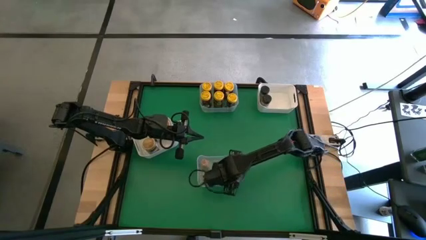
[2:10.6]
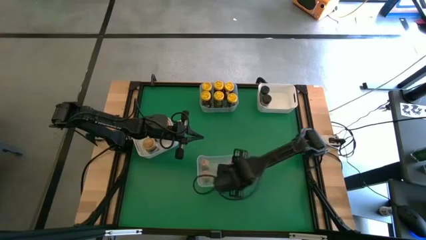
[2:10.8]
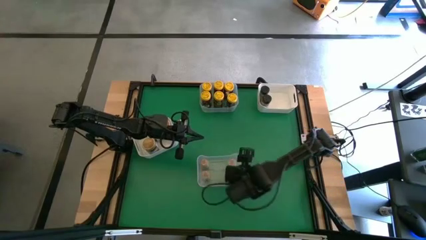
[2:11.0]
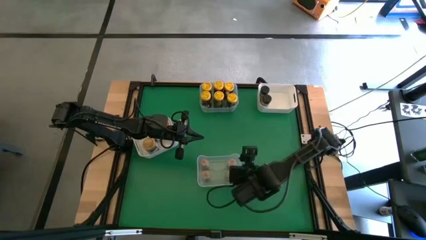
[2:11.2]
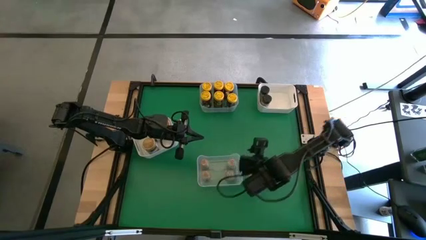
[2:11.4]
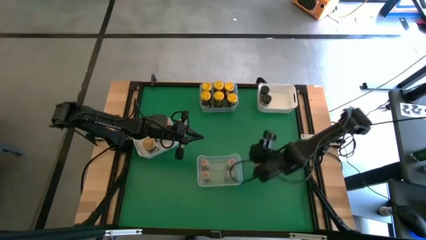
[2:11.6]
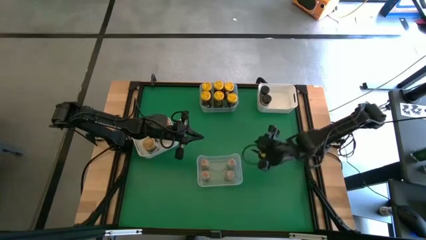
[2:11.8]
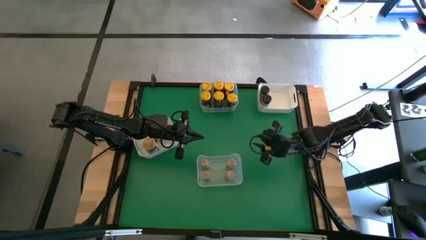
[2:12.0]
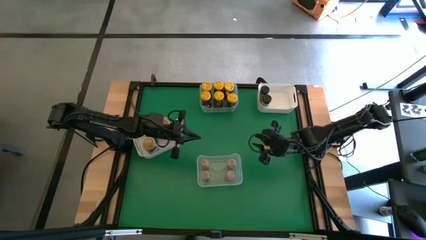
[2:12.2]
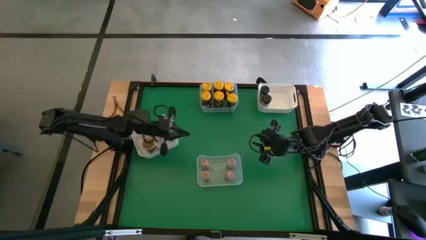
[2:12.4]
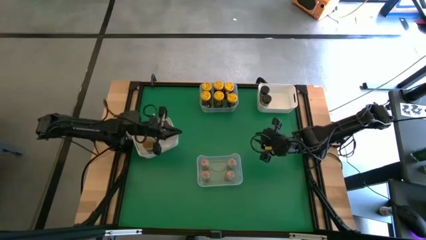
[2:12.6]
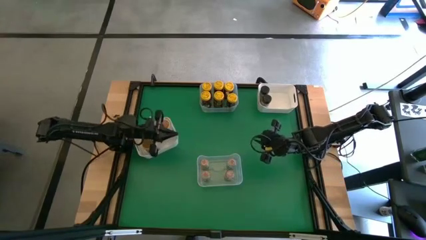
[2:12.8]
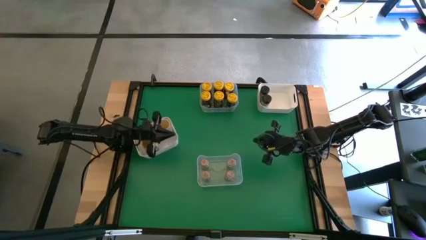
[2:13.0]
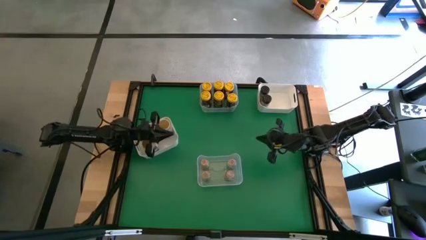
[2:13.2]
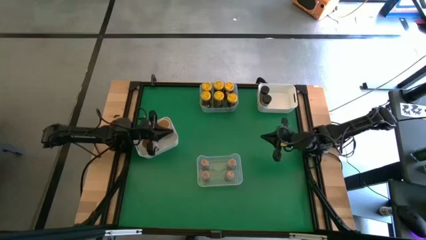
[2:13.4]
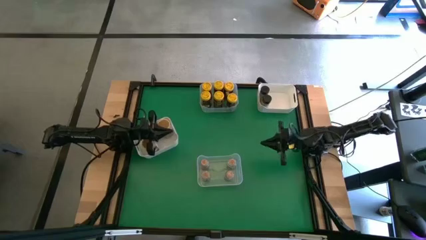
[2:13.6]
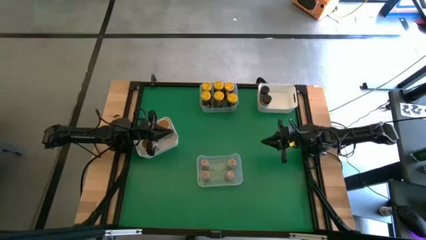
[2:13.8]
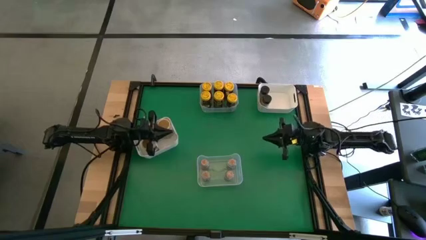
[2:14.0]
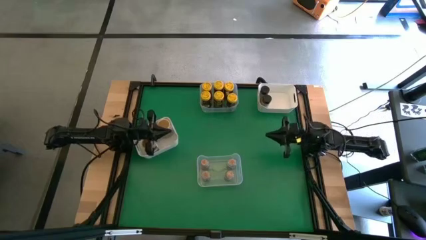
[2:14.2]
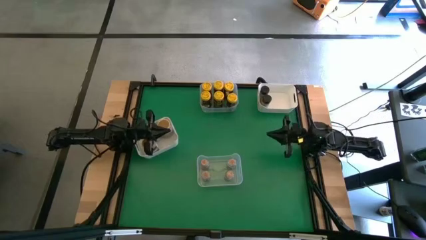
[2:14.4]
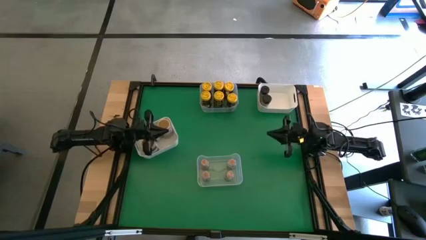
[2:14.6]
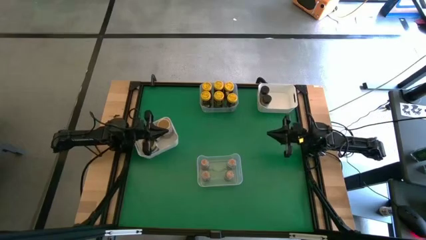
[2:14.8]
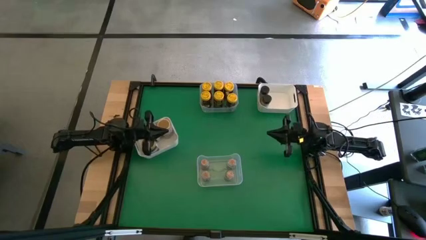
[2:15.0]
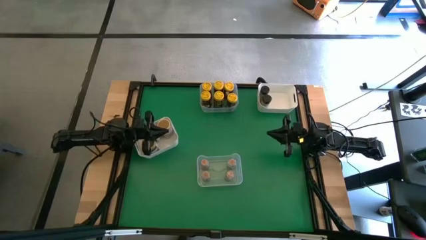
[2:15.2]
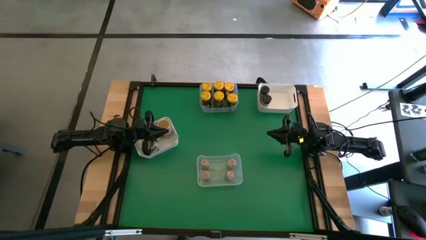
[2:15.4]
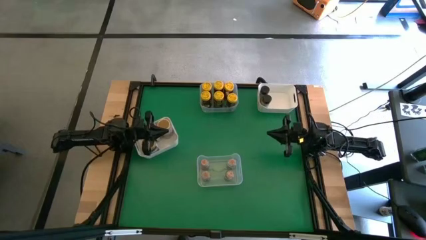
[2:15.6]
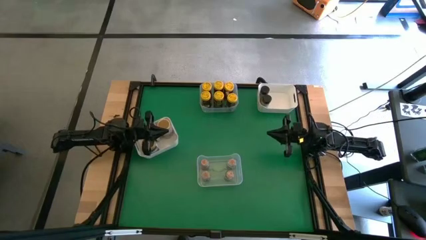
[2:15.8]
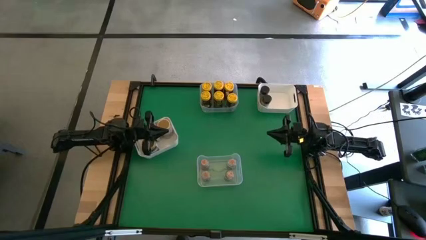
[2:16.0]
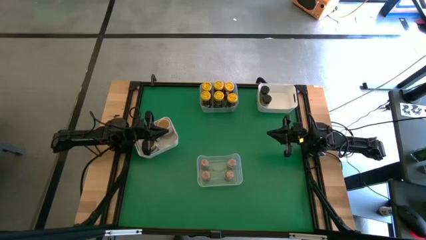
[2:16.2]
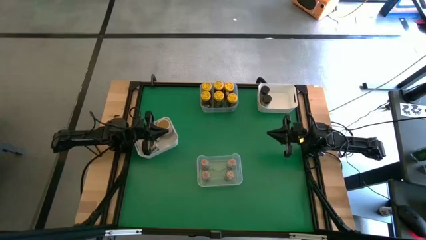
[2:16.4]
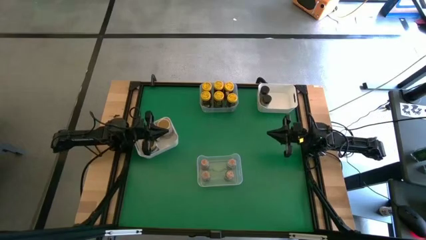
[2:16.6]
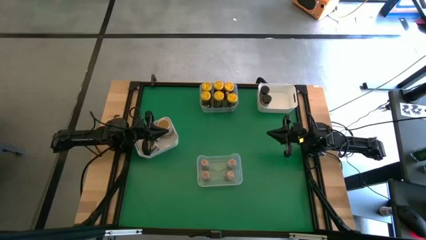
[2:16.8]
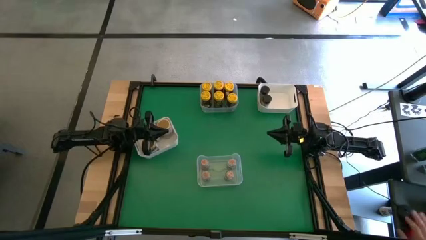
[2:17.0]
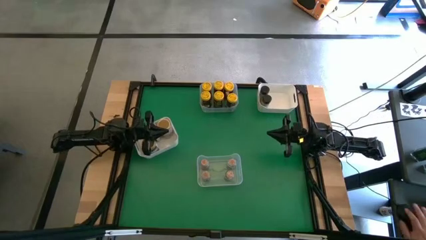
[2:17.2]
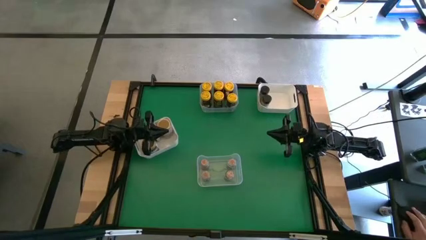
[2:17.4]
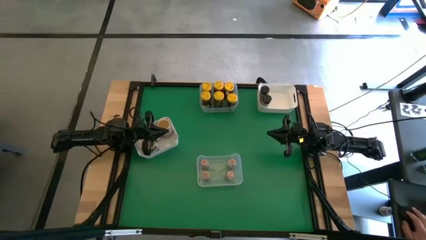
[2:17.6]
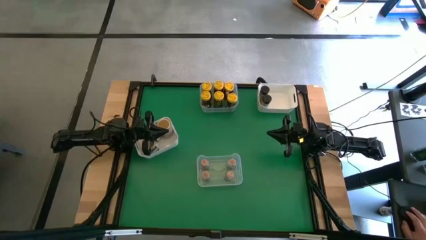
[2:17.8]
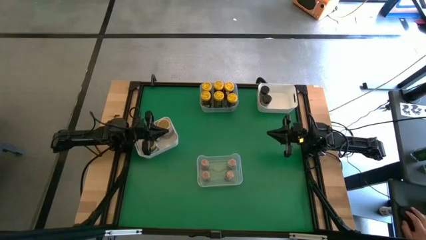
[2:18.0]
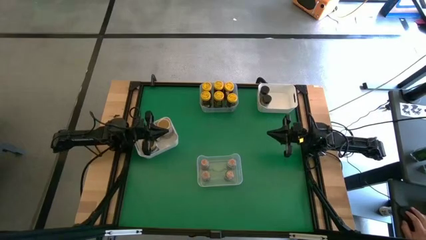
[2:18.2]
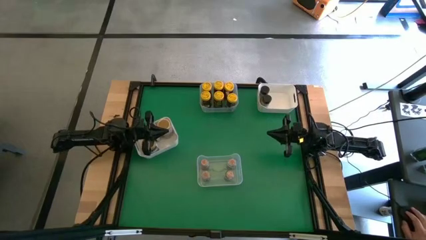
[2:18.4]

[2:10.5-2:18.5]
Task: Sort spices by type
Return to Home Position

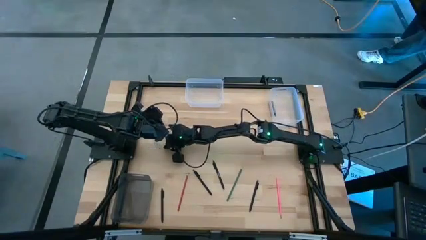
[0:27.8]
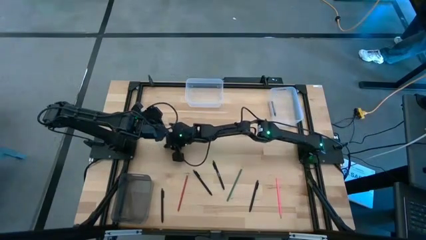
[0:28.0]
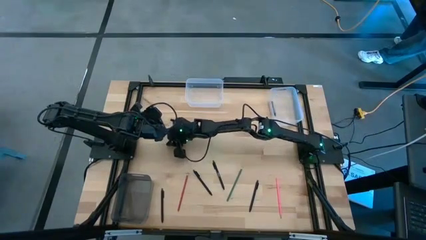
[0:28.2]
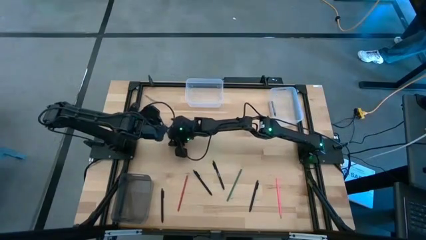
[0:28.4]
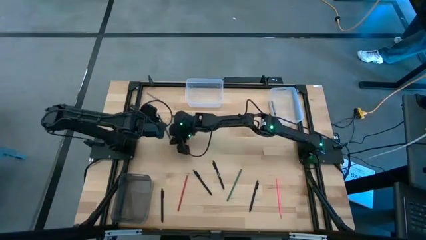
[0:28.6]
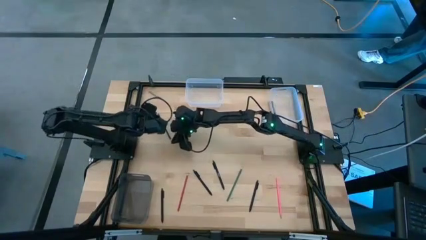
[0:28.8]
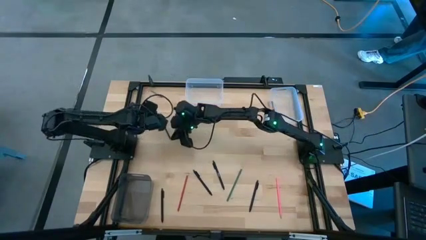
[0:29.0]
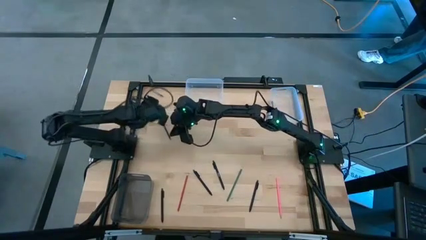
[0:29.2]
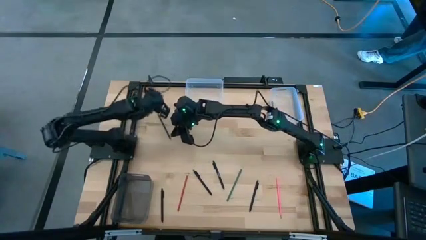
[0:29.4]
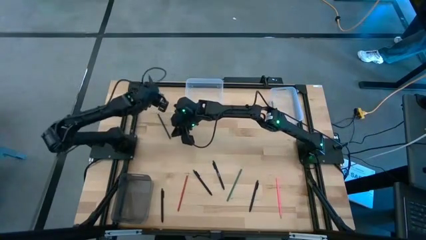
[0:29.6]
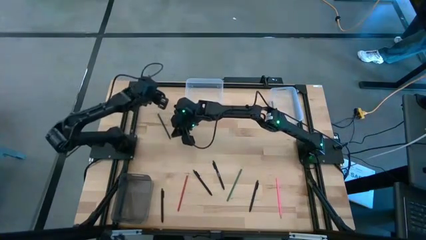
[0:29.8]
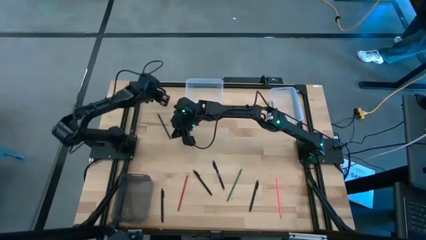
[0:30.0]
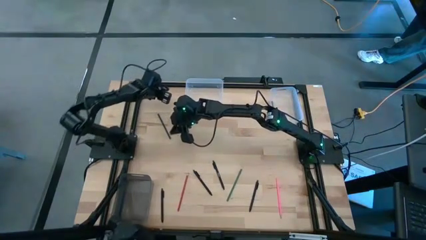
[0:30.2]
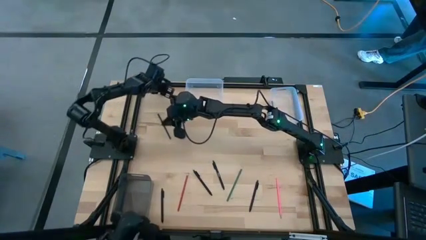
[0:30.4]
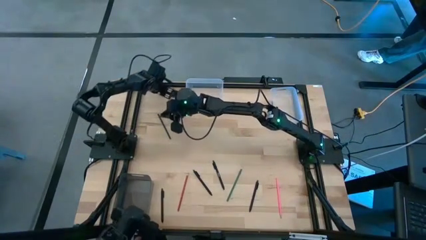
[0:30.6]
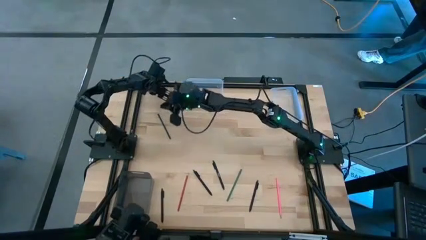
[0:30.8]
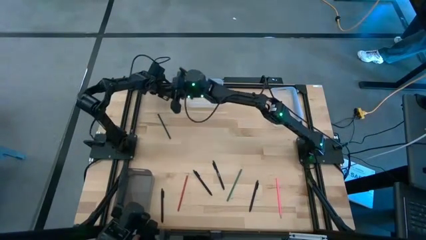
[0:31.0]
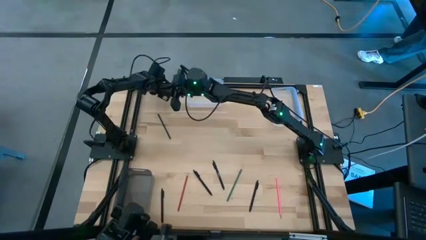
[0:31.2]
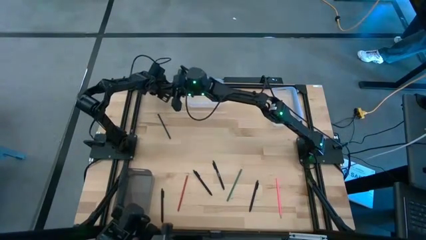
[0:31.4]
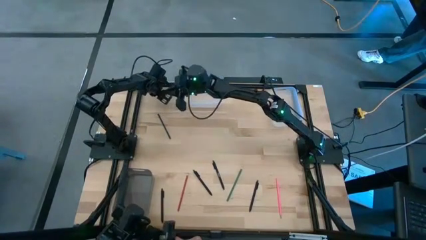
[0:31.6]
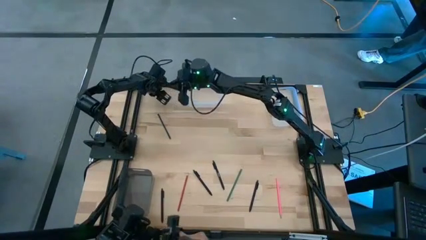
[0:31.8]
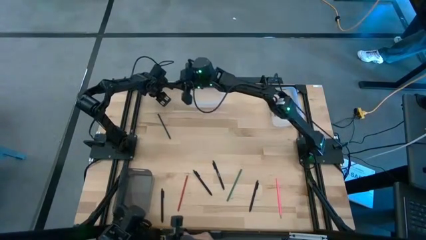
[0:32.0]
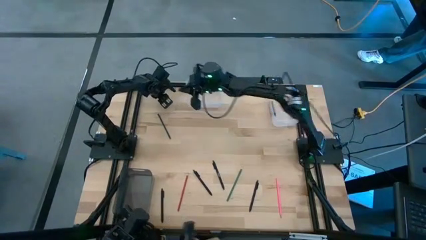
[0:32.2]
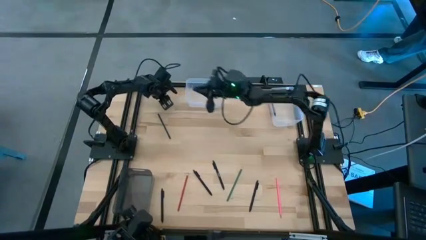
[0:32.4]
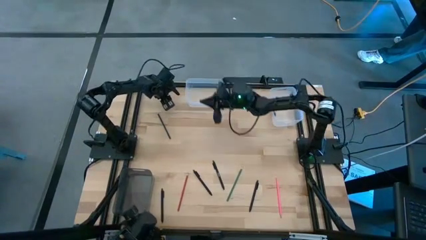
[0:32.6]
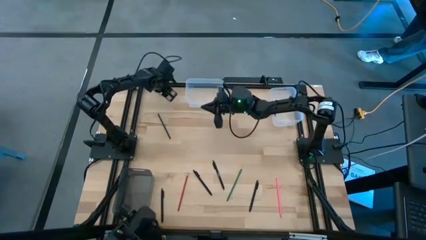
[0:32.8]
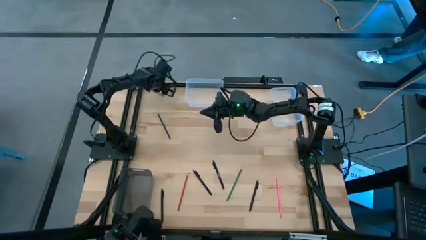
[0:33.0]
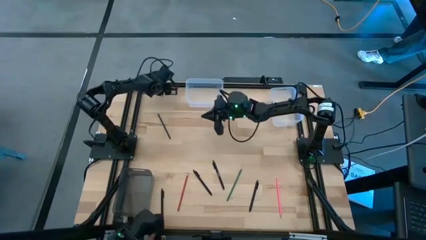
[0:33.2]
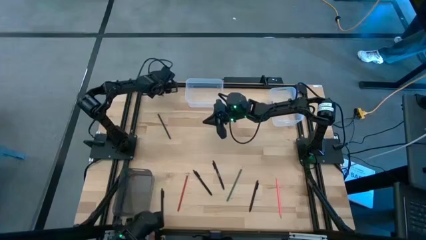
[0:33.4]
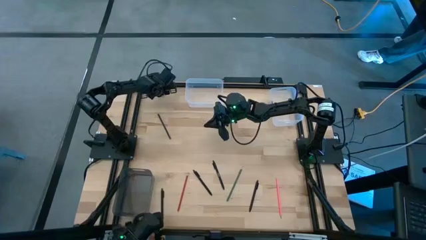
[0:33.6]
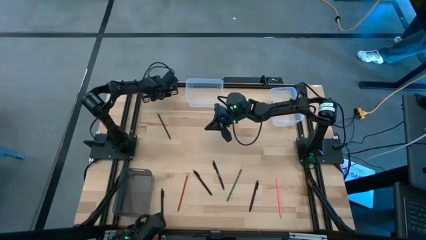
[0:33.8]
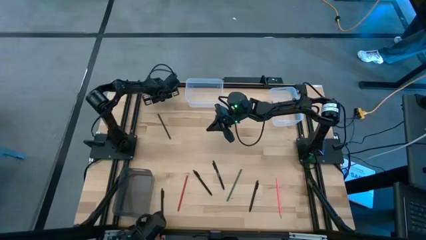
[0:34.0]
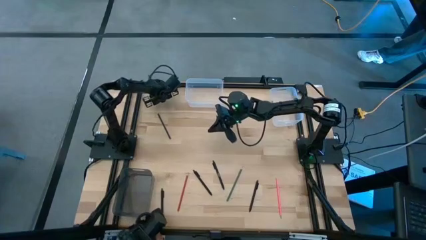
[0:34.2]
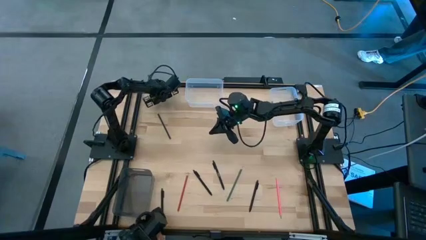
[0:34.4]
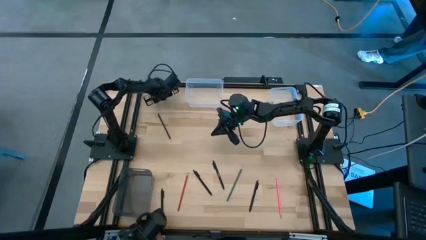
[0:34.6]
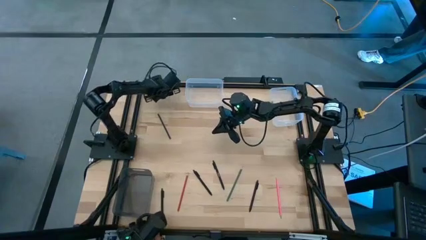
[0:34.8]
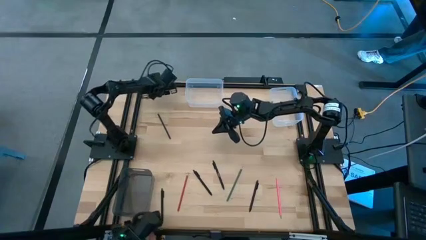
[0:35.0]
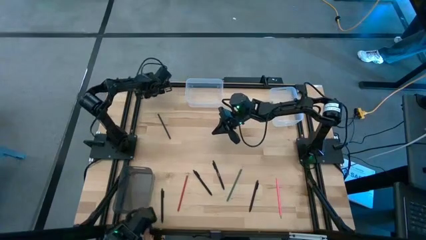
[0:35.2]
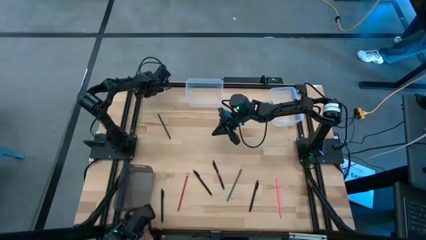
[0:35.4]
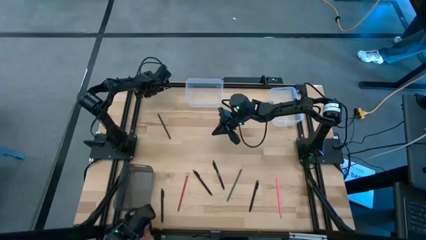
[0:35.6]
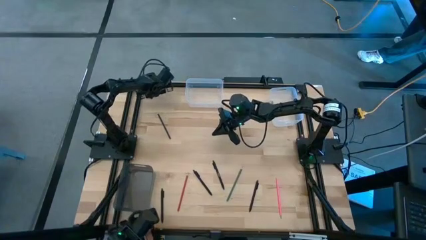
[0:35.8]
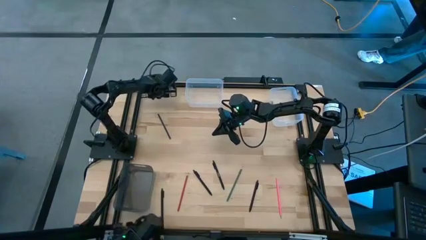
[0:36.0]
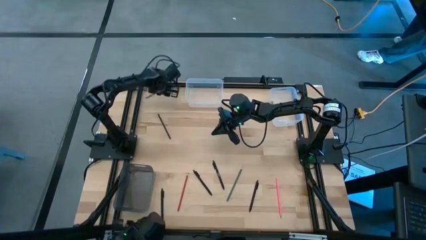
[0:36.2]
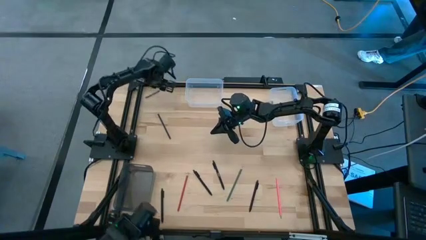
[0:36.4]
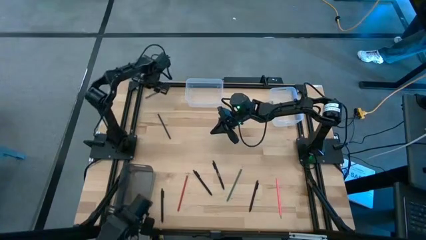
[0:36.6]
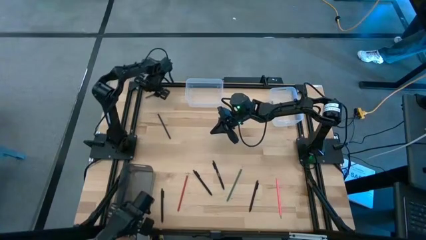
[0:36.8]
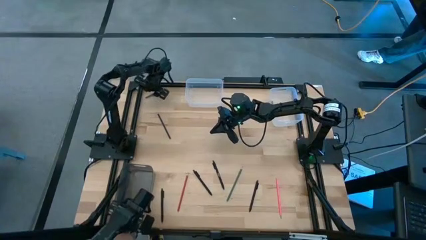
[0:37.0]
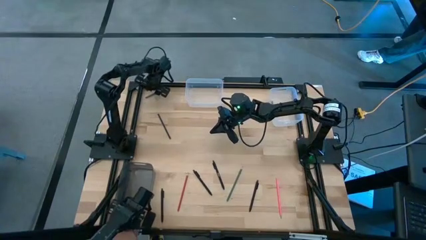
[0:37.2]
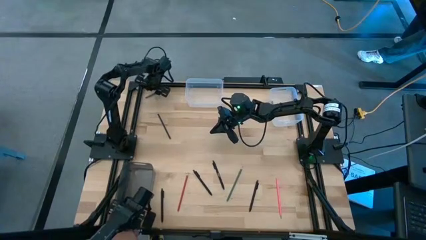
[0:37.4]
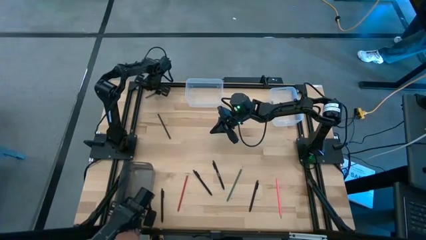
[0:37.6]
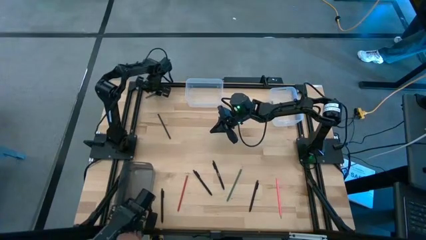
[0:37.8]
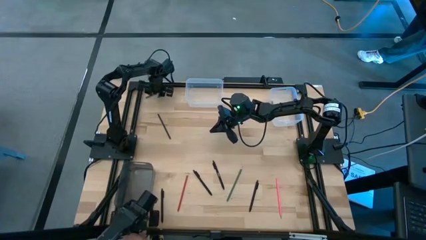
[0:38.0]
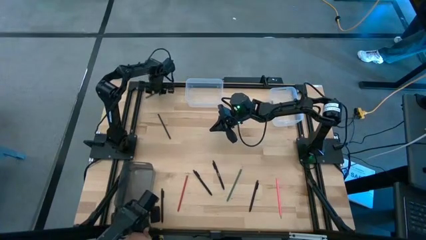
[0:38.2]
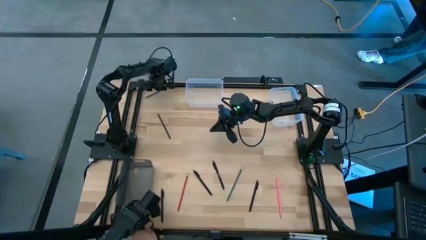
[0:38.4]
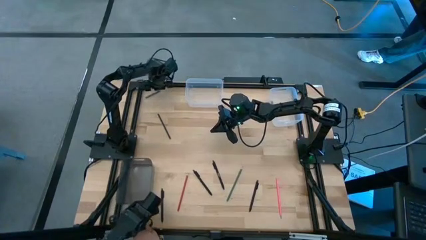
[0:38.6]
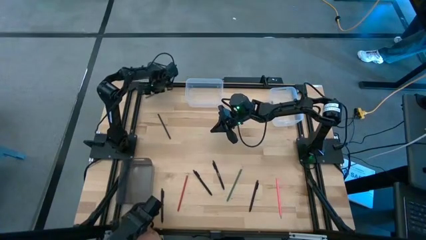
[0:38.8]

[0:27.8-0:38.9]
Task: Sort crayons/erasers/pens/pencils in bins
Put the gray crayon into the right transparent bin
